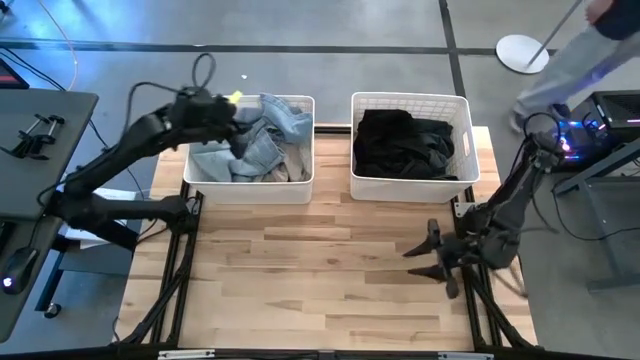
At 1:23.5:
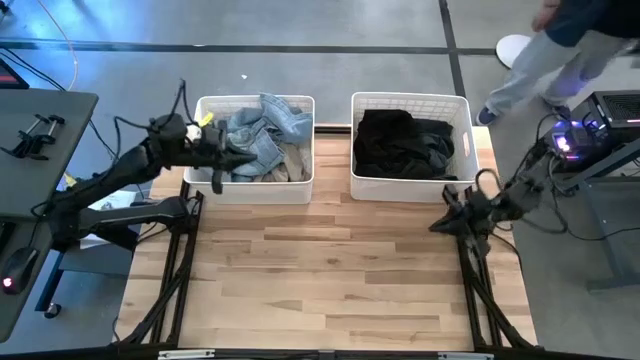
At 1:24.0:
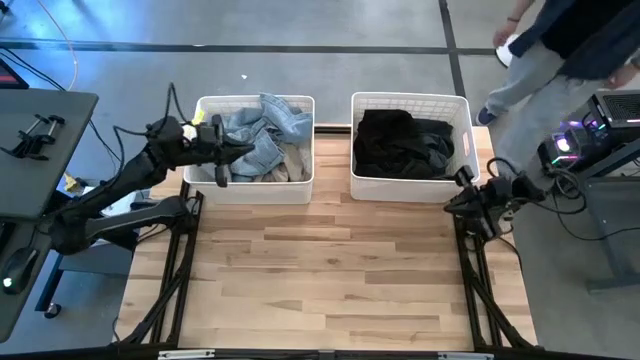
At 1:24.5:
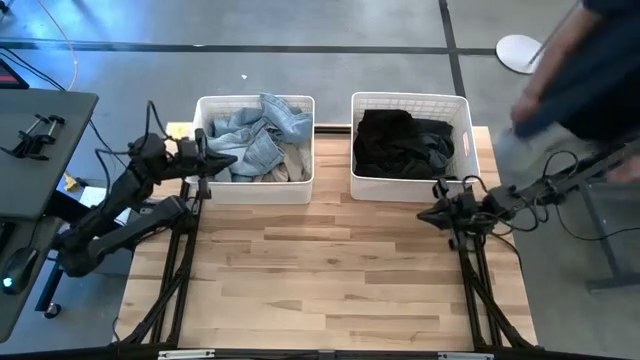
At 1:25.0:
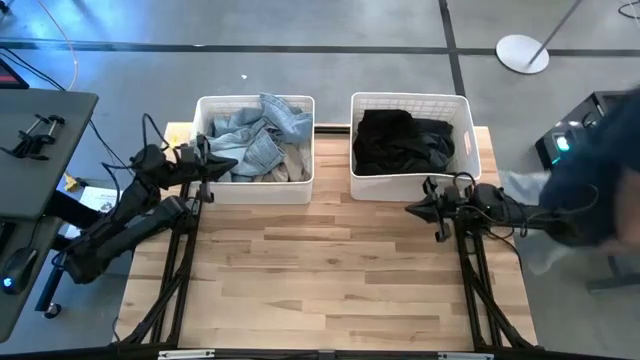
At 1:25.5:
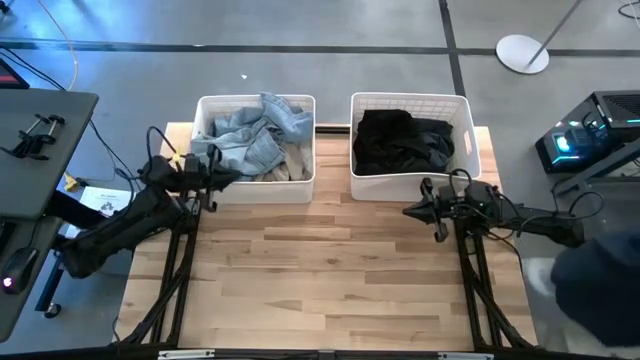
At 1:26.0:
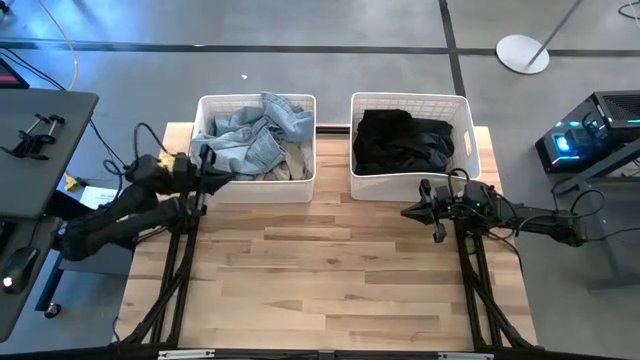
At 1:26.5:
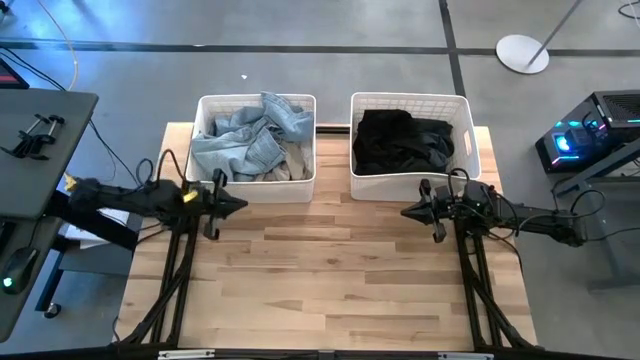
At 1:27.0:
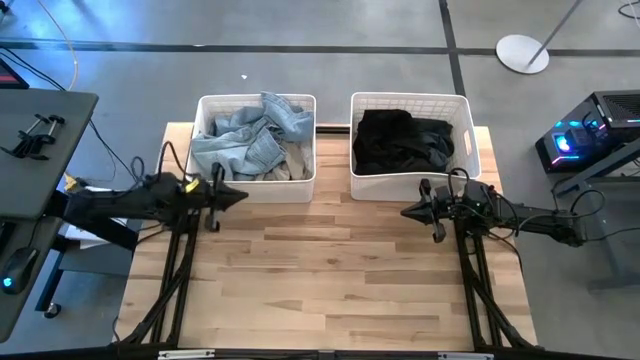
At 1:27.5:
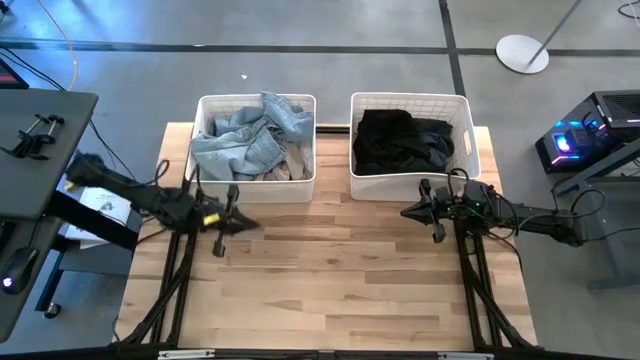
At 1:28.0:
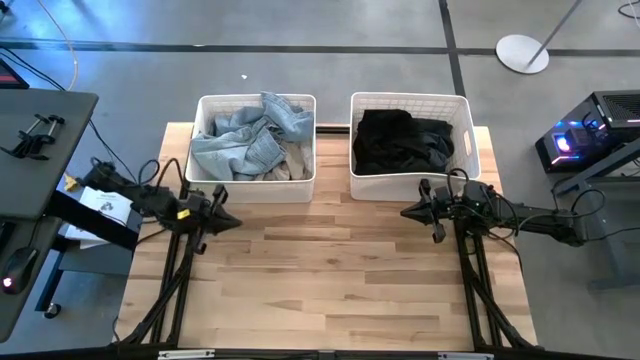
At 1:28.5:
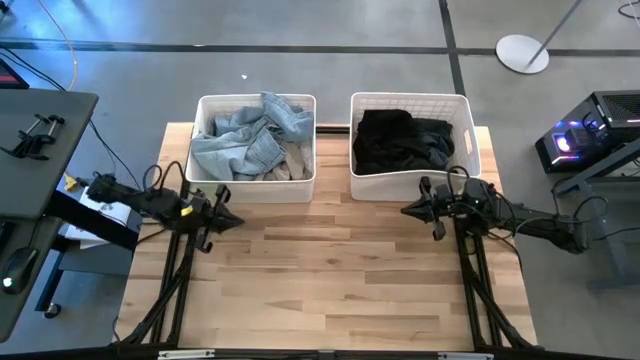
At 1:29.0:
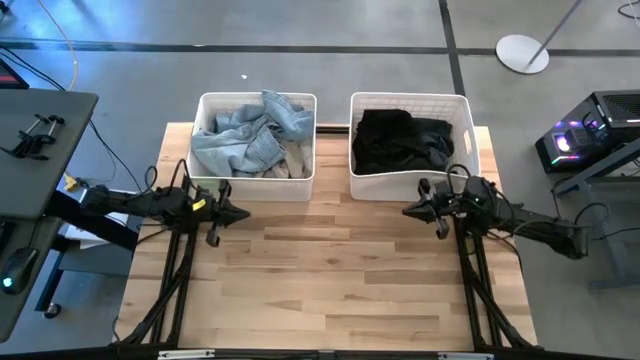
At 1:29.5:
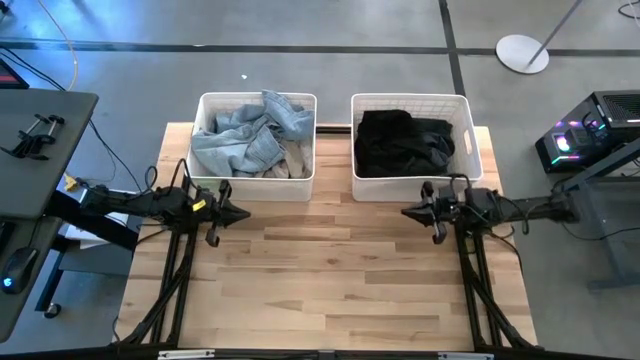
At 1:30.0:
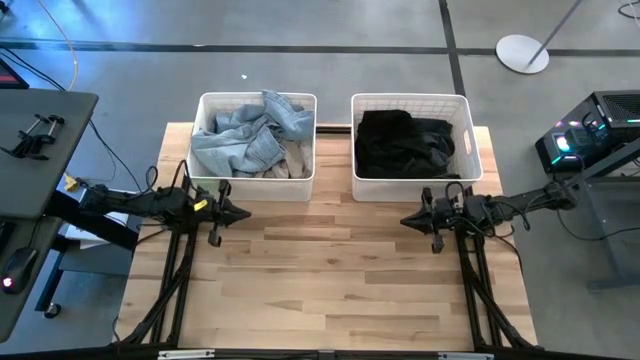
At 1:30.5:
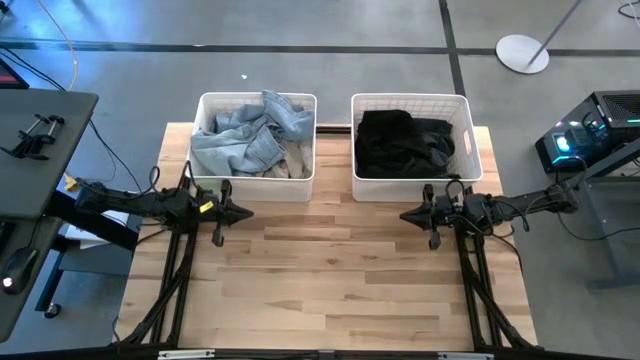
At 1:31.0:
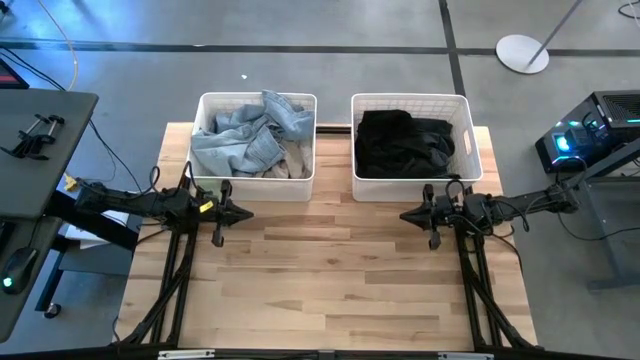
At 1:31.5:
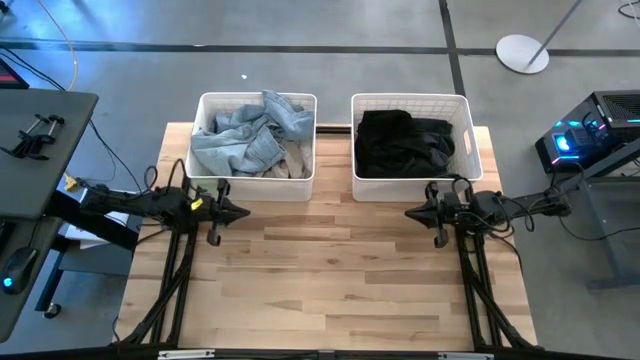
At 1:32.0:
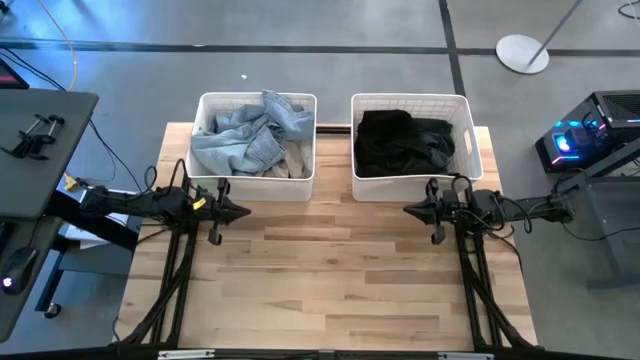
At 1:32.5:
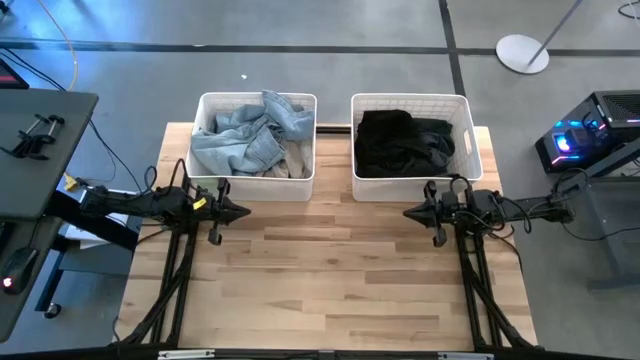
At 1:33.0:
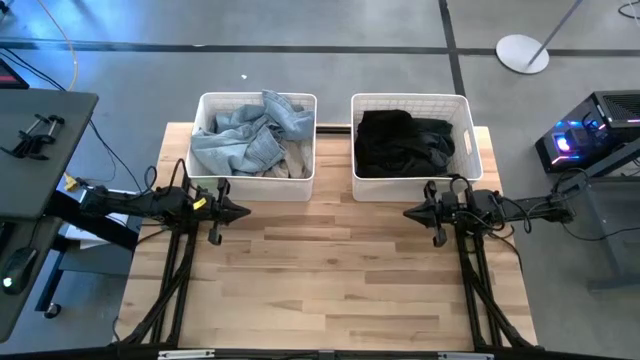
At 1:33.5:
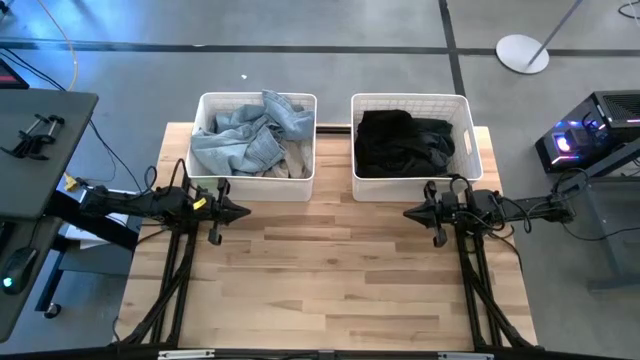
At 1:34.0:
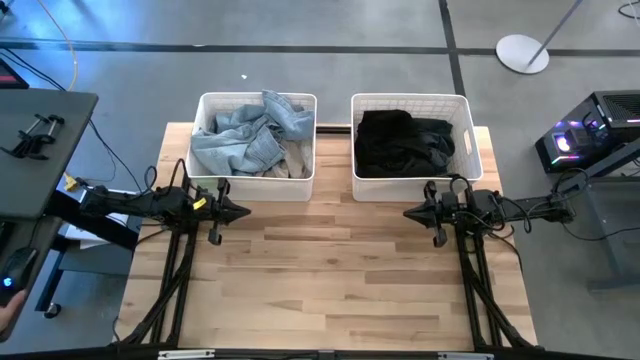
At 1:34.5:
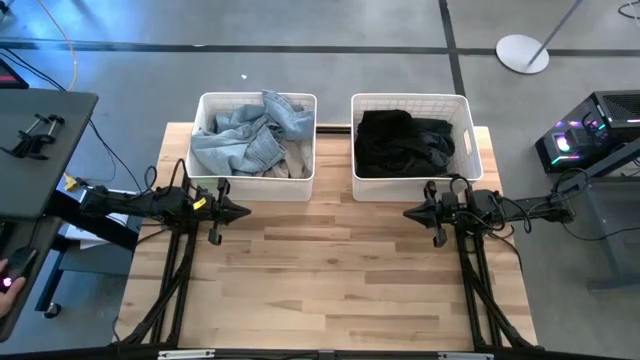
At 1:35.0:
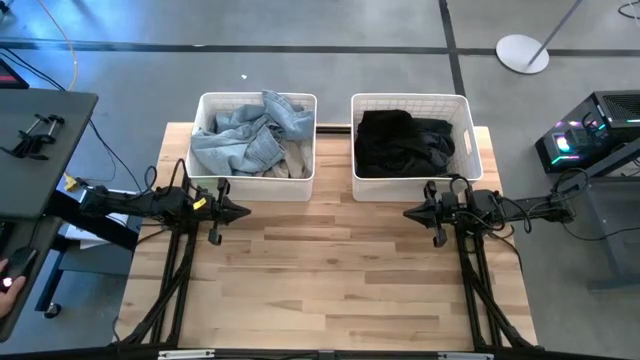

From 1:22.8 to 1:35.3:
Task: Sort clothes
Return to Home Position

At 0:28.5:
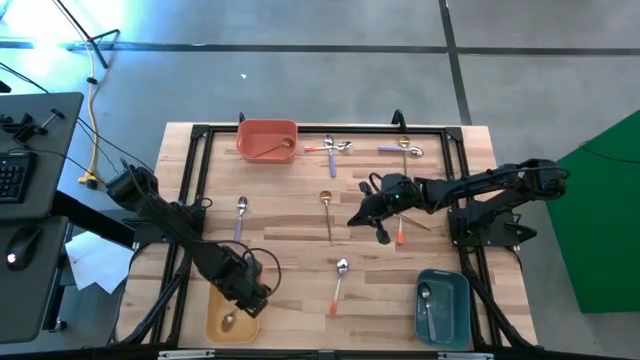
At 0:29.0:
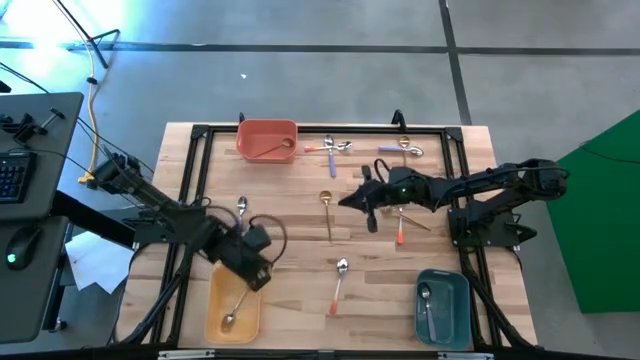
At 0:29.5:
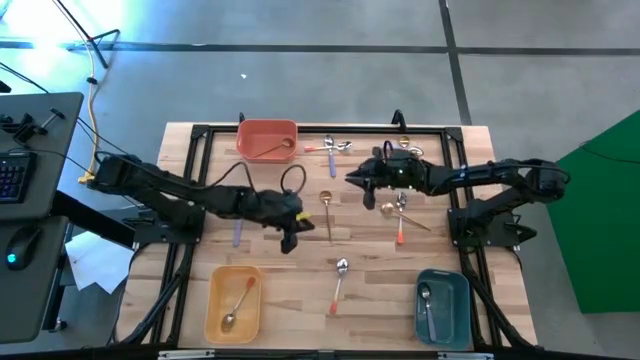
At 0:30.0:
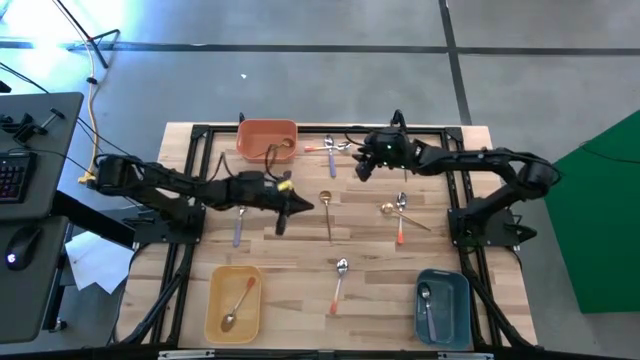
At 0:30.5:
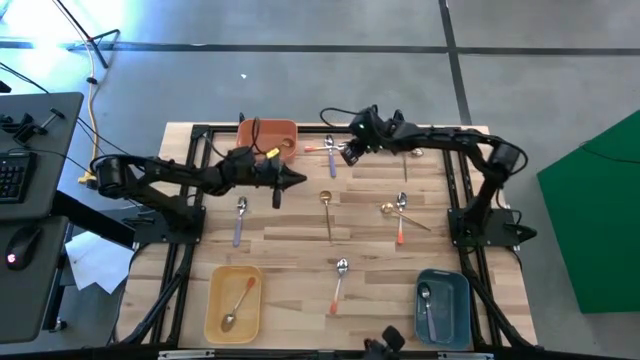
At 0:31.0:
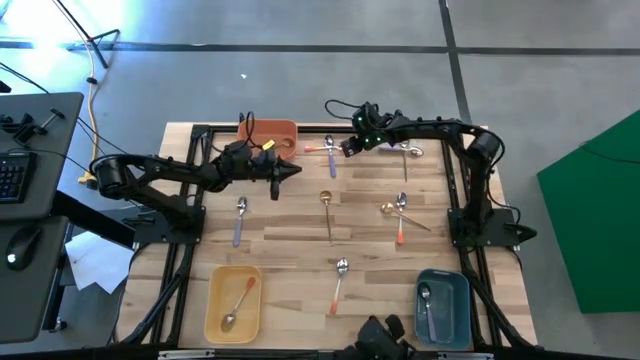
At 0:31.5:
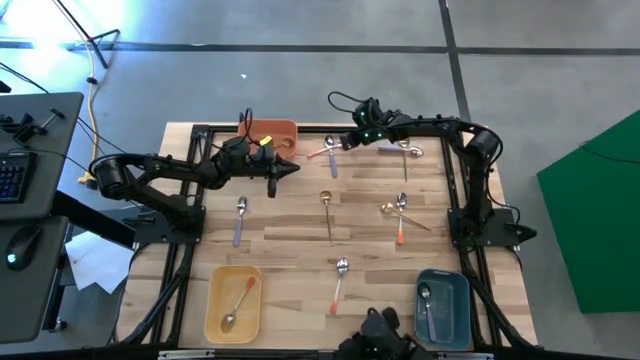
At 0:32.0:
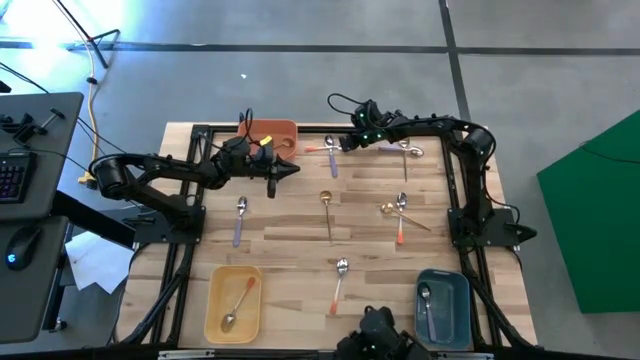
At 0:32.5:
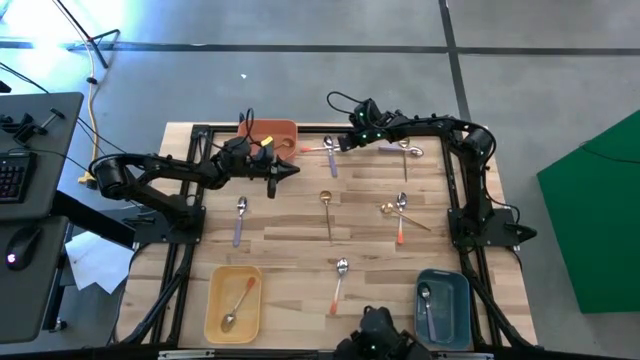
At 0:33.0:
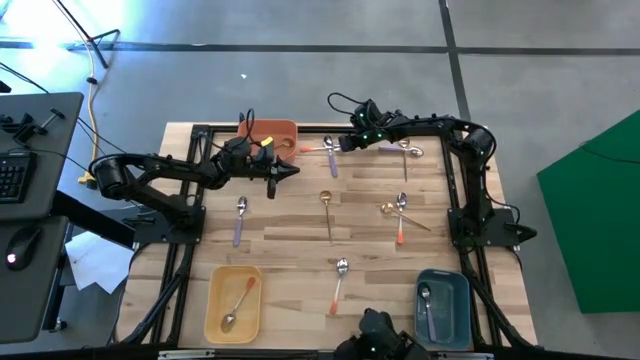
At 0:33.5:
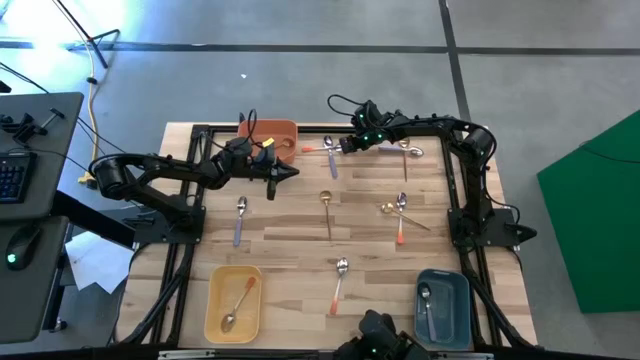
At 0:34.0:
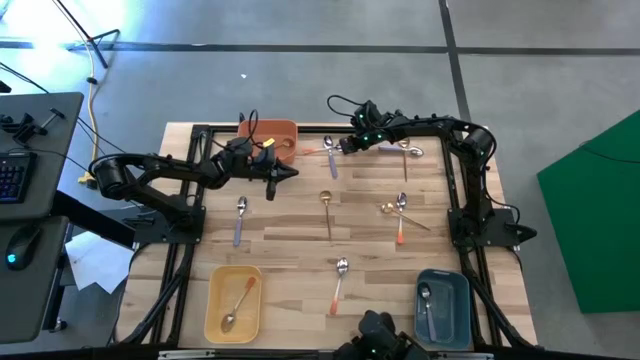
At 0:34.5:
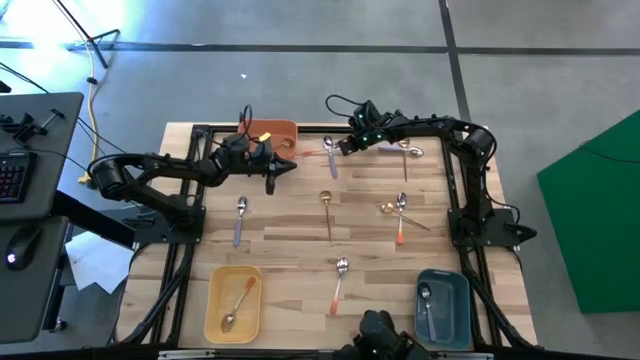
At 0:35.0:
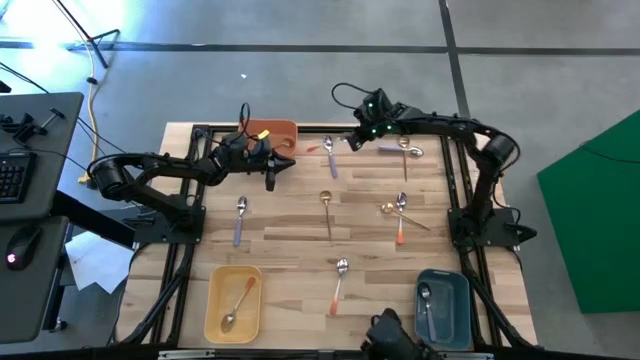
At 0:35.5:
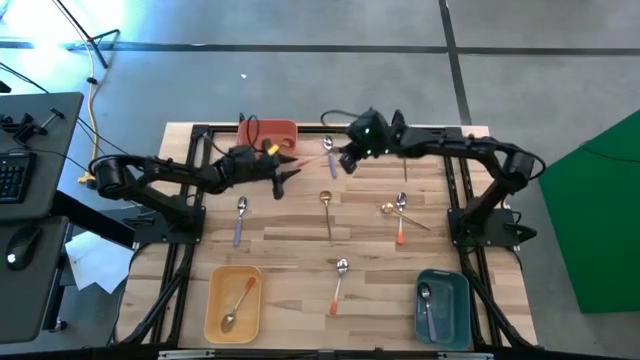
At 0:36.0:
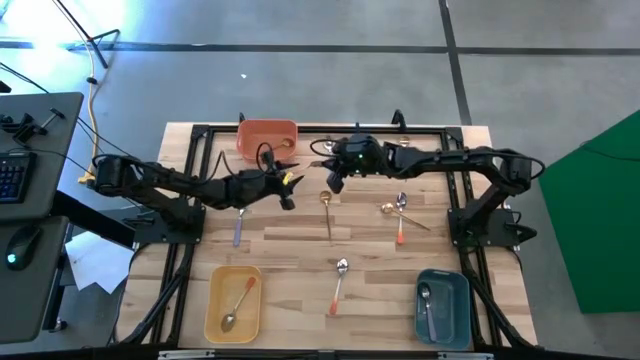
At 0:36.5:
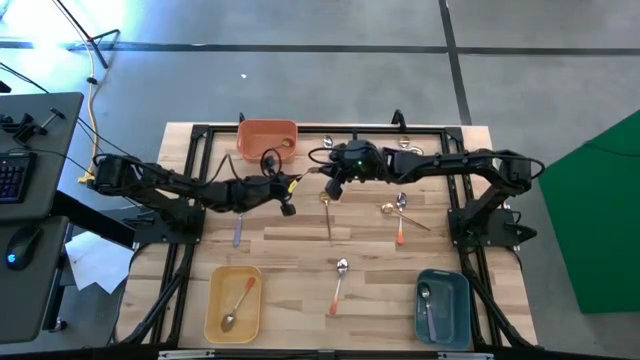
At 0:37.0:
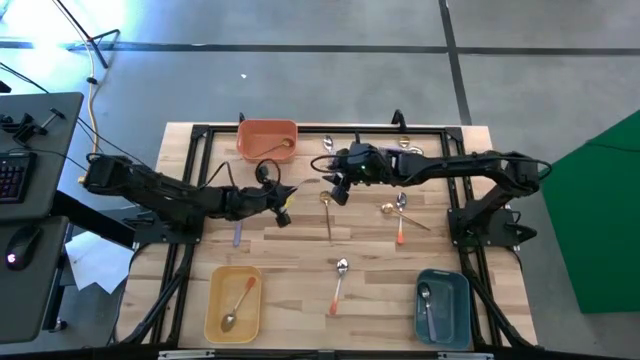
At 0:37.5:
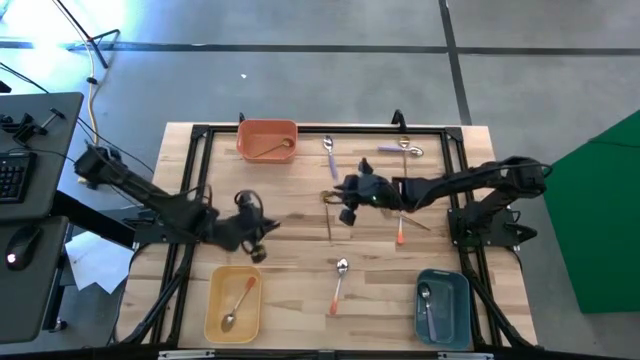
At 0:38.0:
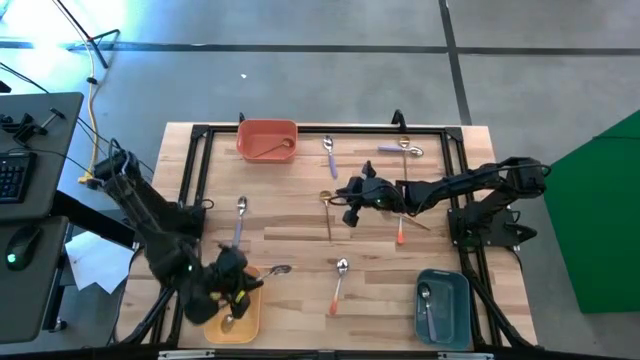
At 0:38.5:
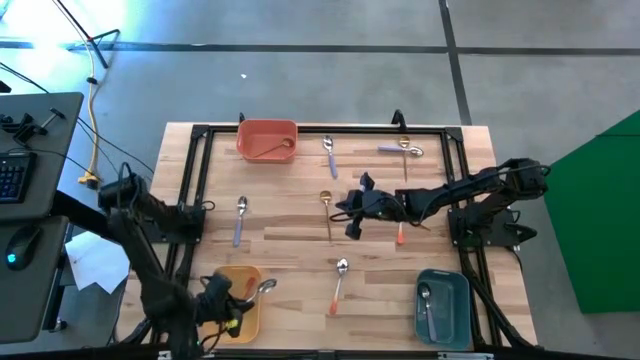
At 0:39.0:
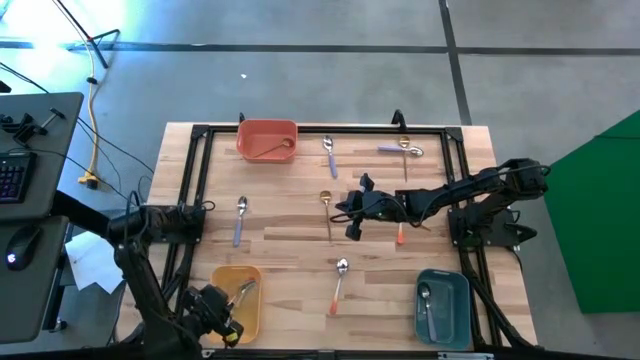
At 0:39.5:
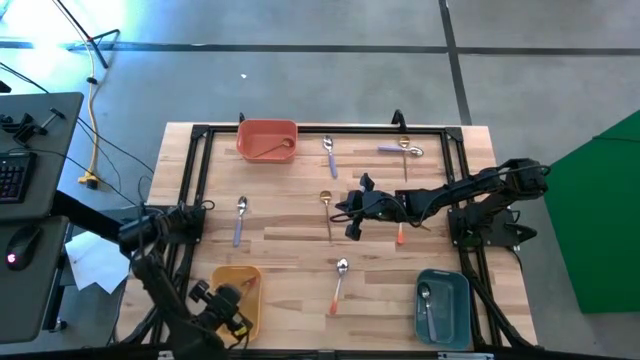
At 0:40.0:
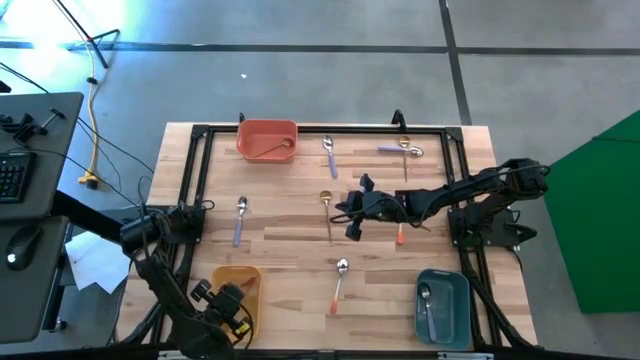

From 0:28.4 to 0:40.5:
Task: Sort silverware by color (type)
Put the top orange spoon into the yellow bin
